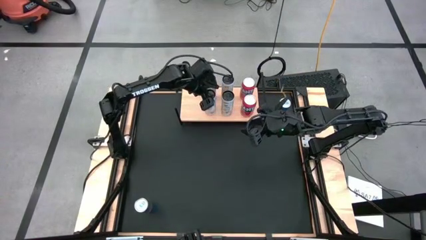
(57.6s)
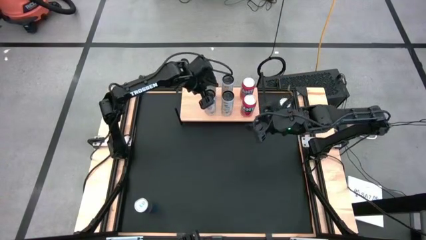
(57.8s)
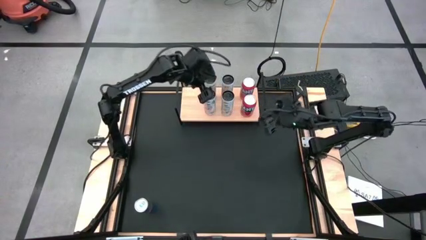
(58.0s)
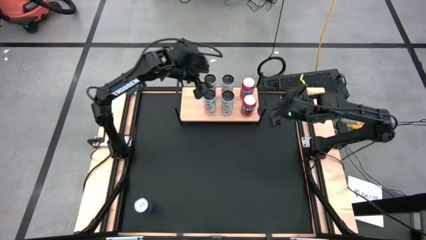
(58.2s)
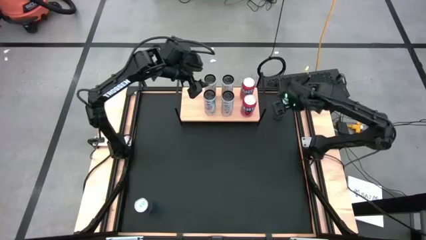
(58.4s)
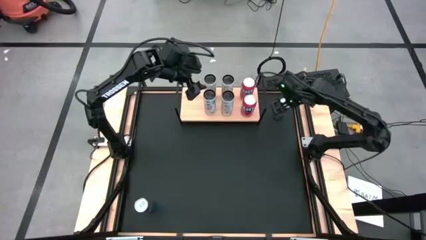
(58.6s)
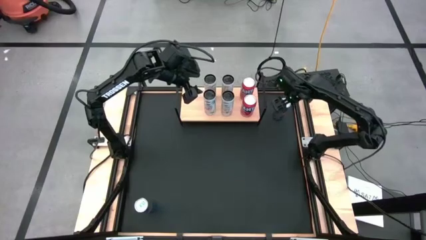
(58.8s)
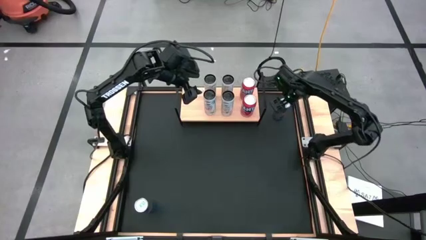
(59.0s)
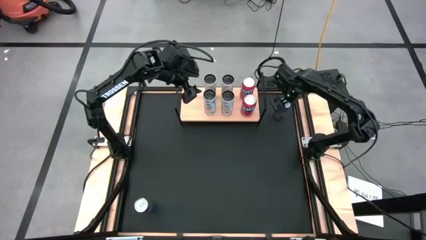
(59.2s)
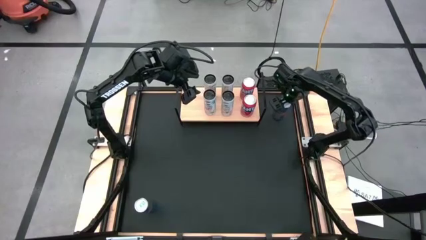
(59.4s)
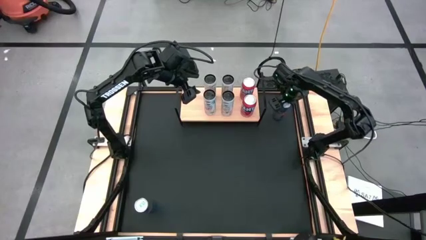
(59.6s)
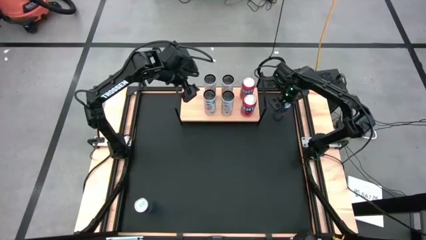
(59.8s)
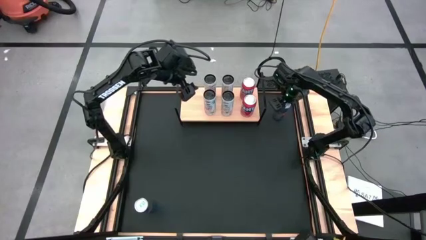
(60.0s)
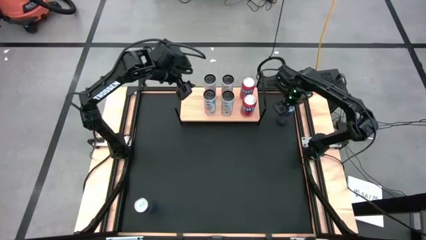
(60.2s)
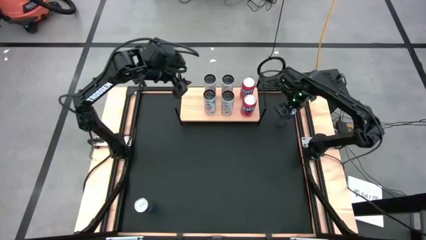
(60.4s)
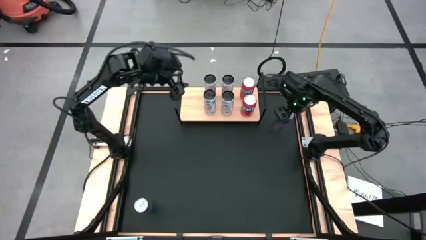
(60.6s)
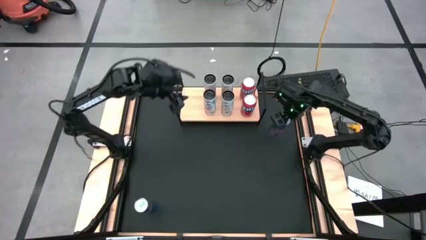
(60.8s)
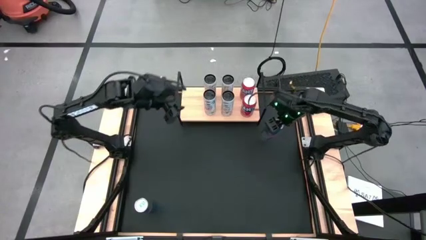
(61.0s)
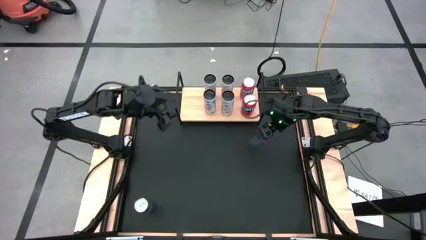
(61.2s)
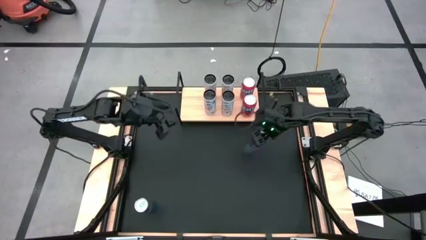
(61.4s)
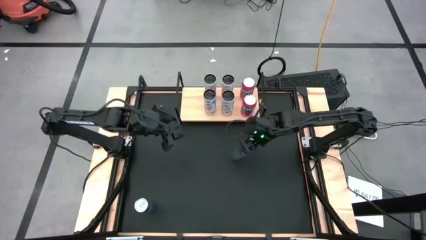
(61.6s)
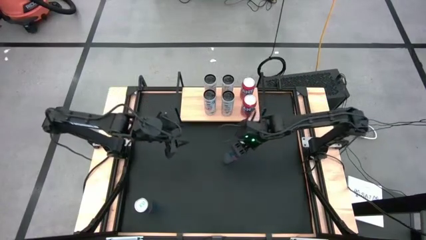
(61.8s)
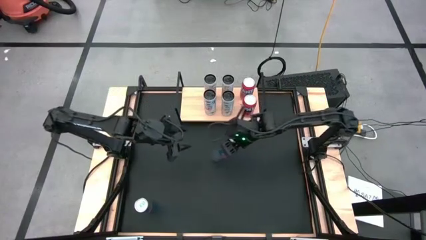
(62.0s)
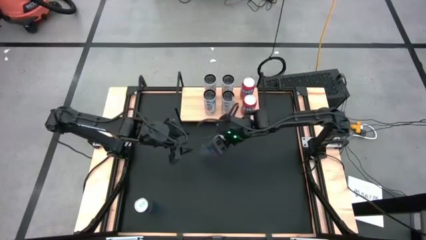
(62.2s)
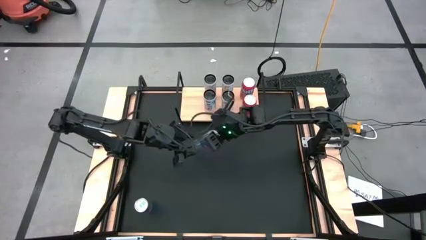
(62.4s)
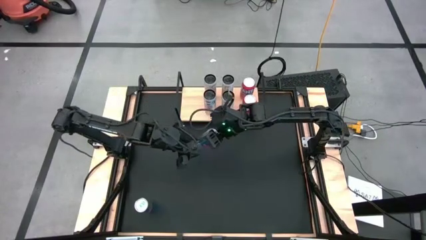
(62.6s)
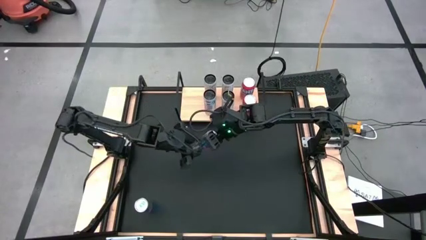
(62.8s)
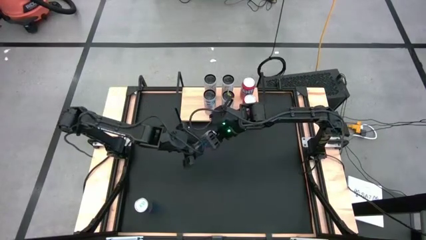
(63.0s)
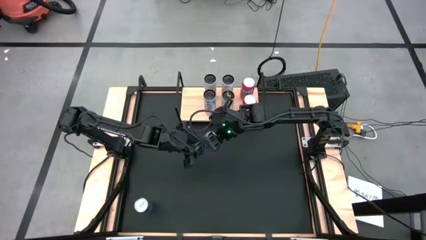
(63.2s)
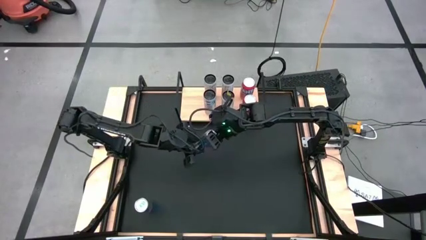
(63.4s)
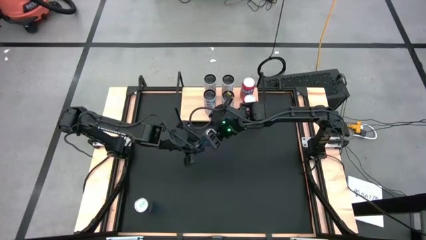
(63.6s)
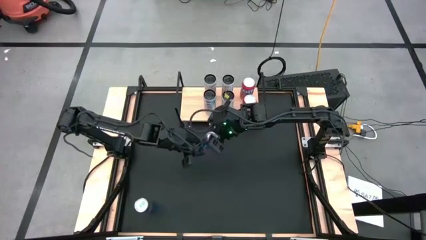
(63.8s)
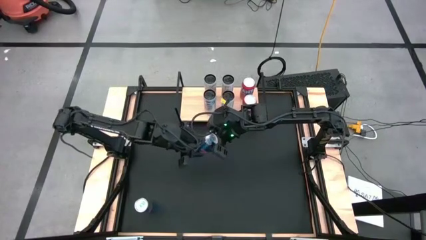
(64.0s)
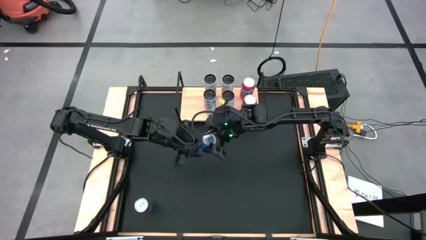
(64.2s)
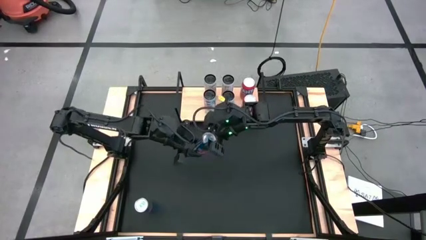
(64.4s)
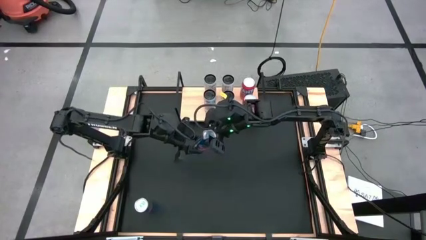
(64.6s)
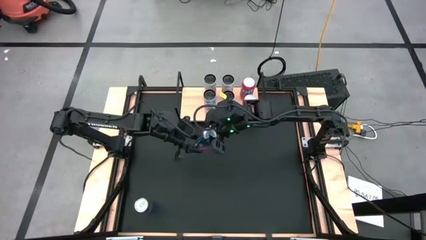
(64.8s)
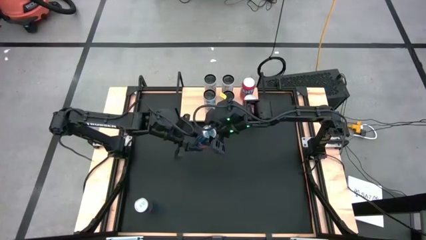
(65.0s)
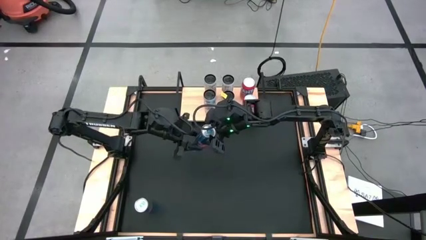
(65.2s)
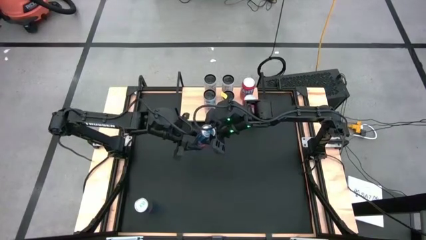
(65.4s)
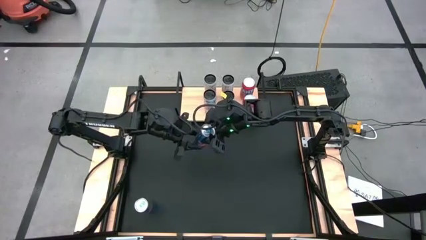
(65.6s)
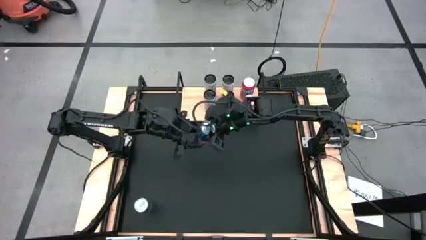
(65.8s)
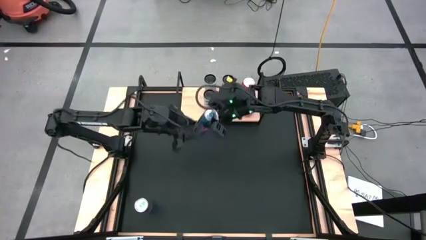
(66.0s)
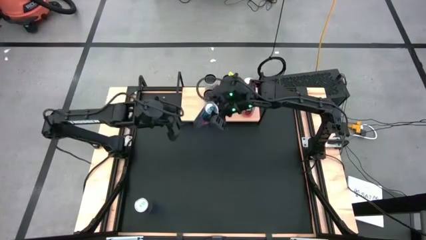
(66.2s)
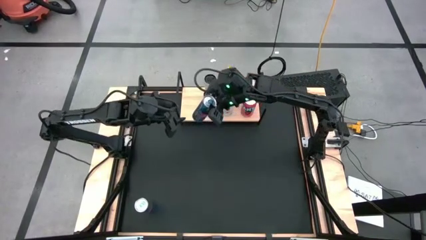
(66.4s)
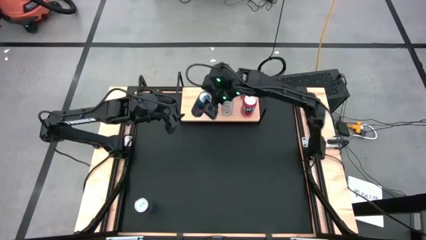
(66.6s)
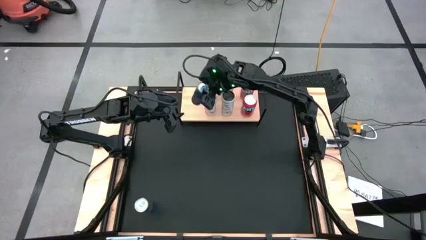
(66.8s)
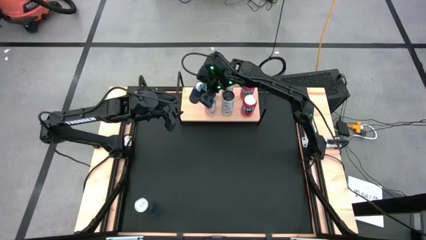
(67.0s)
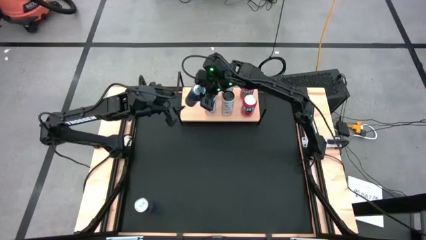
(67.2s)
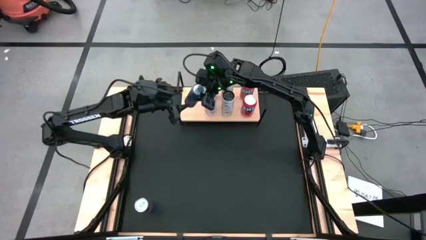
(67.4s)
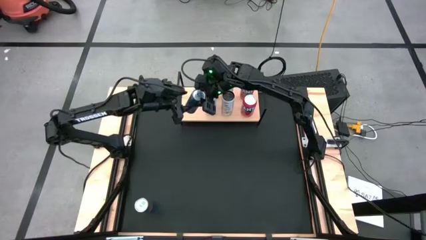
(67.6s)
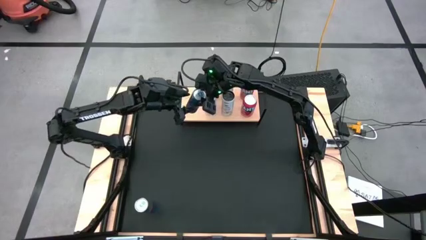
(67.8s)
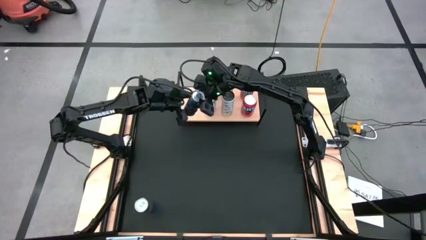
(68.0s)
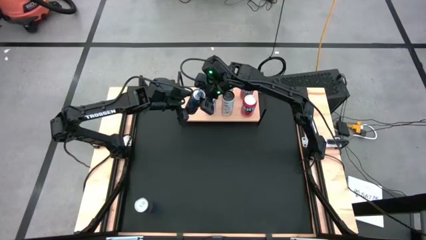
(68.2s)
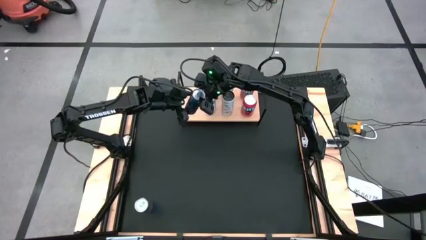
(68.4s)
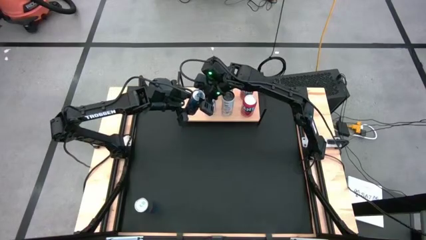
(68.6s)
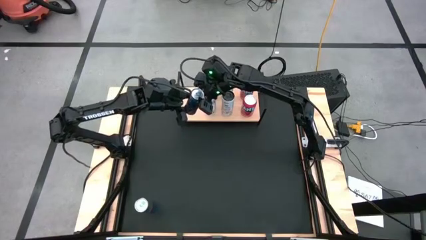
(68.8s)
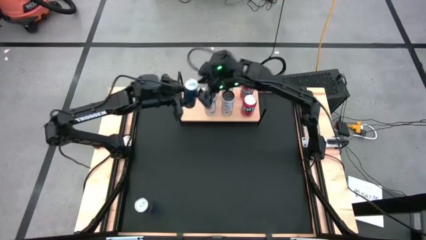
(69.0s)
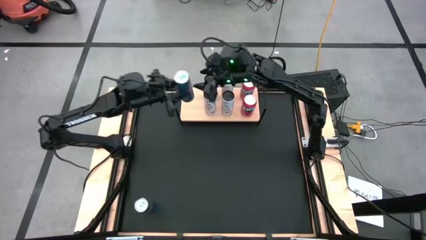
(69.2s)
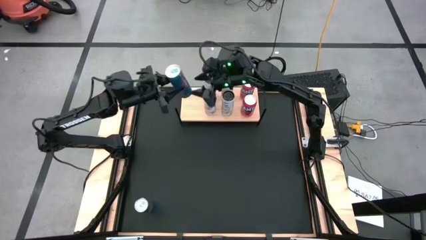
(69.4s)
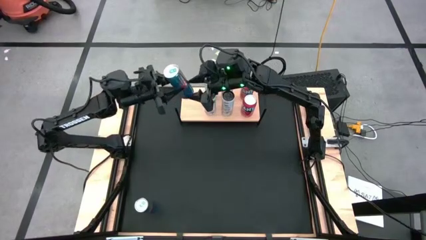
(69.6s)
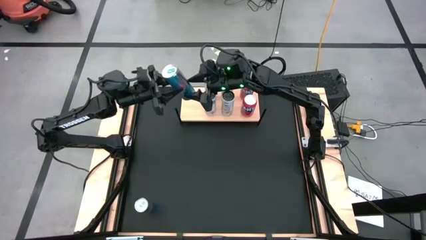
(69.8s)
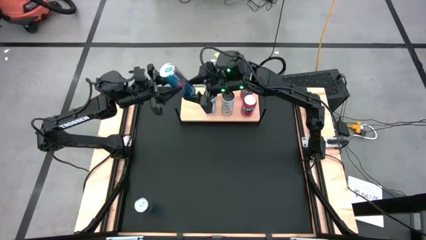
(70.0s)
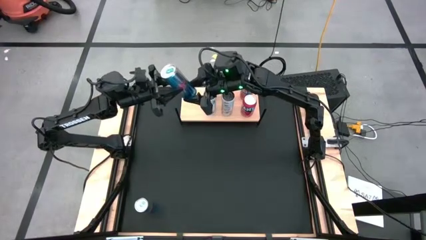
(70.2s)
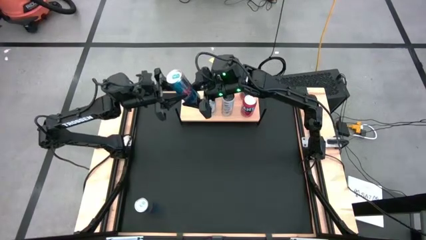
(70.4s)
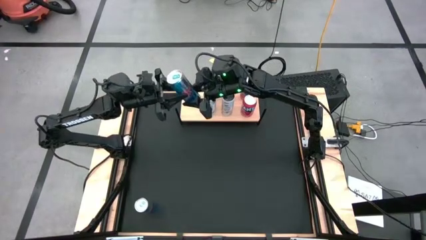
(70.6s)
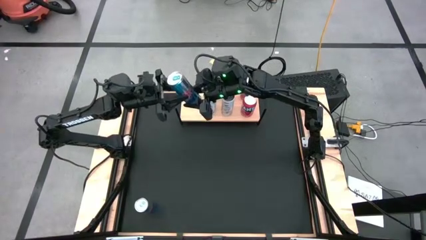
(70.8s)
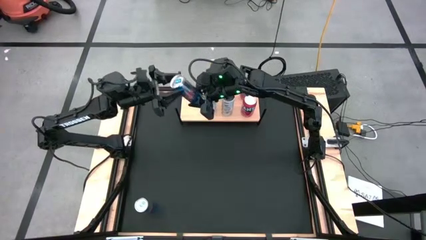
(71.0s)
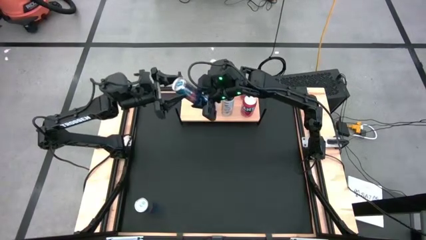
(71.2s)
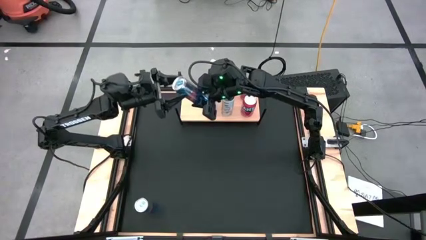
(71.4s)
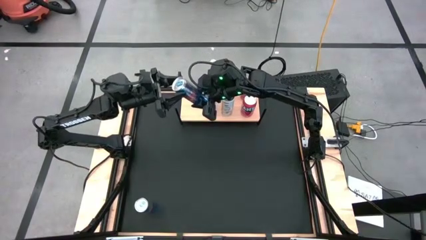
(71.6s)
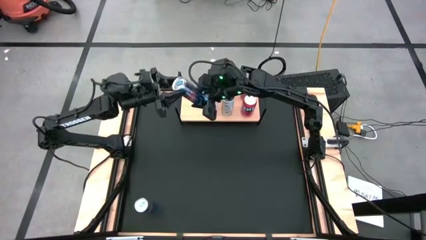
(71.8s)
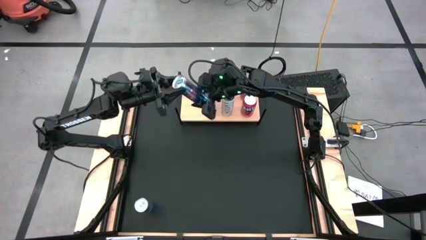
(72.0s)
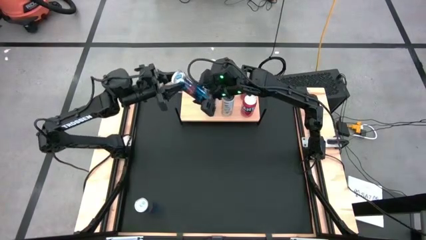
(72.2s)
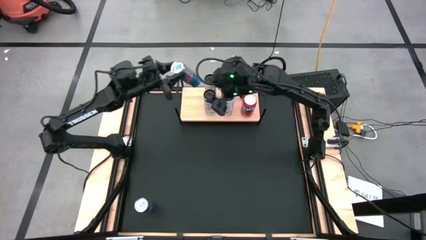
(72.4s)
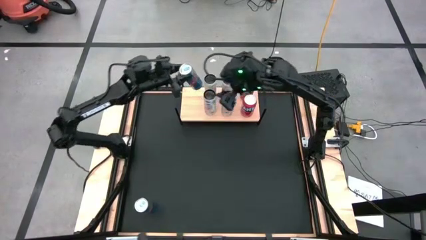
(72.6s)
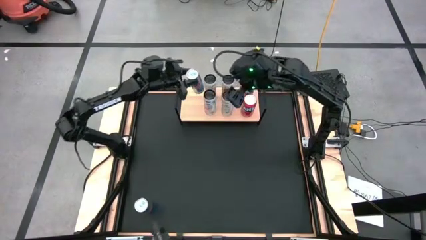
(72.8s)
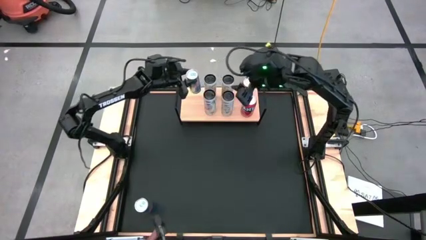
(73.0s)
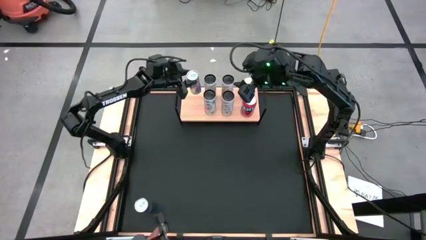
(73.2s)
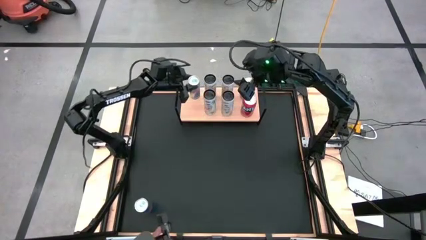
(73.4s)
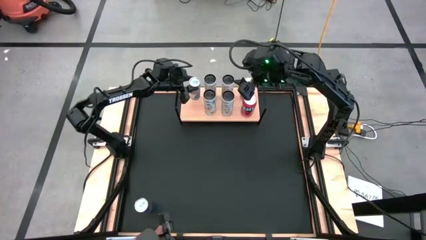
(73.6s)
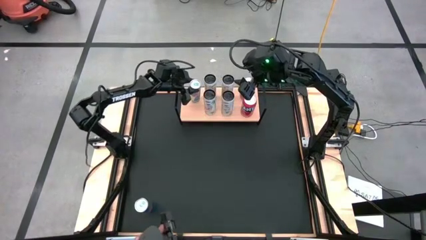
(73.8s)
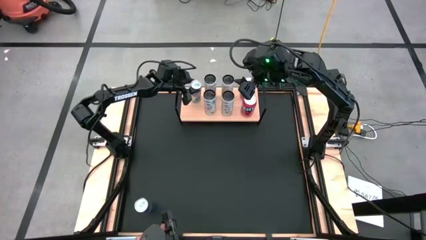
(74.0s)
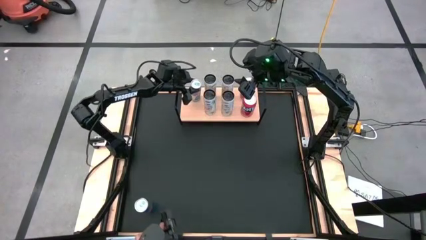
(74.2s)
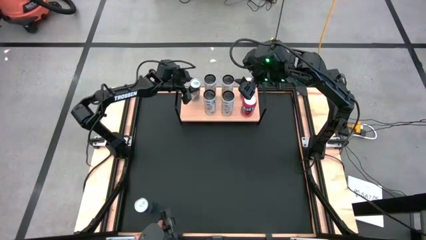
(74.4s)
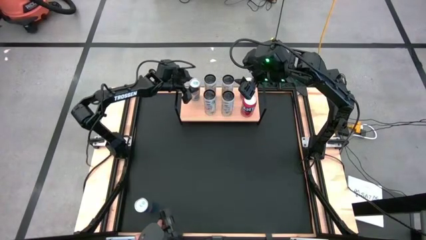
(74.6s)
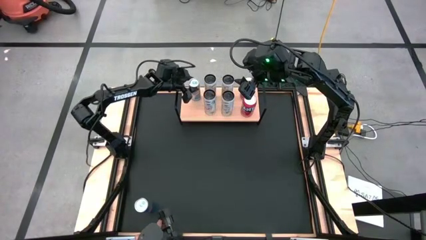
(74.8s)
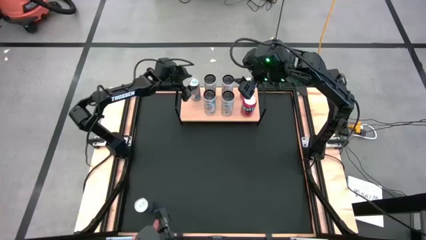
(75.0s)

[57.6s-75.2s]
Task: Place canned beverage on shelf
Put the top blue soda can on the shelf
